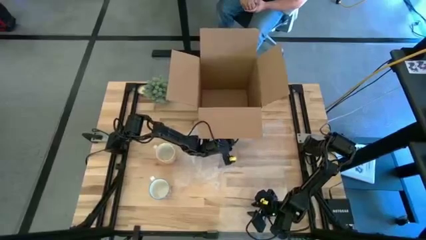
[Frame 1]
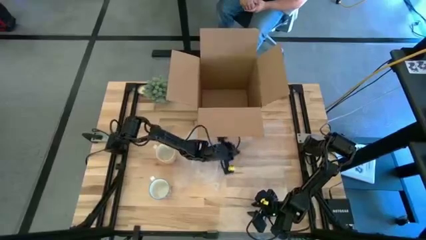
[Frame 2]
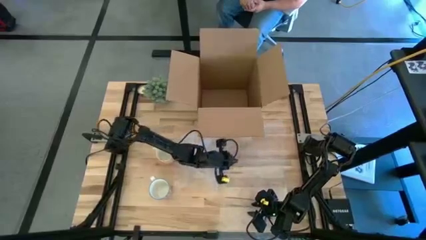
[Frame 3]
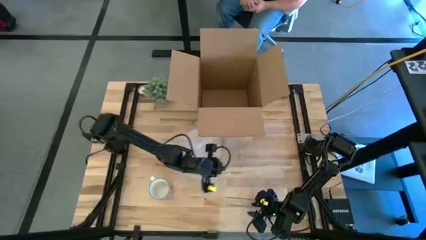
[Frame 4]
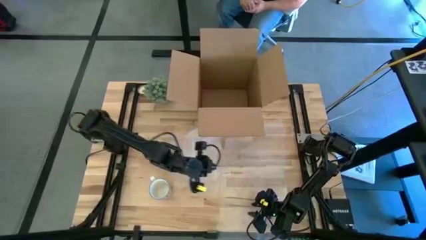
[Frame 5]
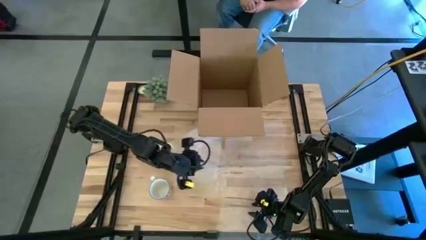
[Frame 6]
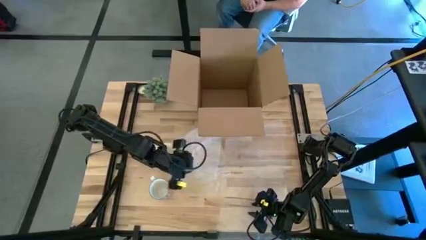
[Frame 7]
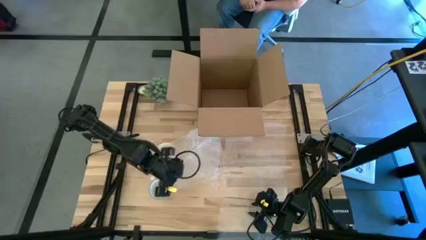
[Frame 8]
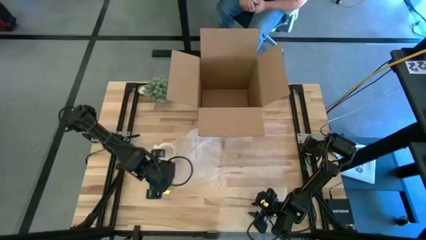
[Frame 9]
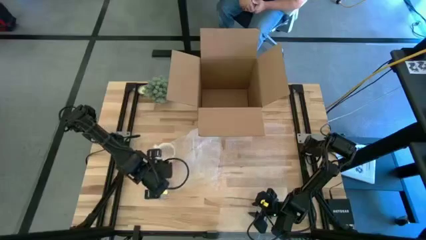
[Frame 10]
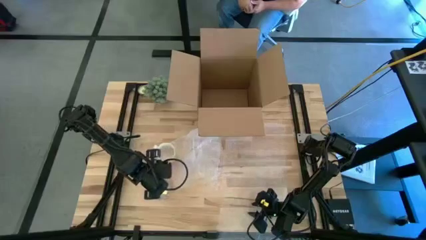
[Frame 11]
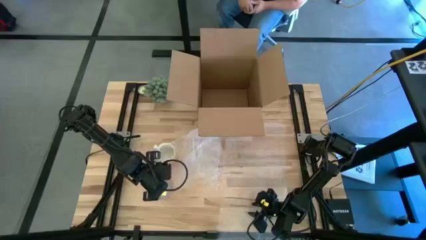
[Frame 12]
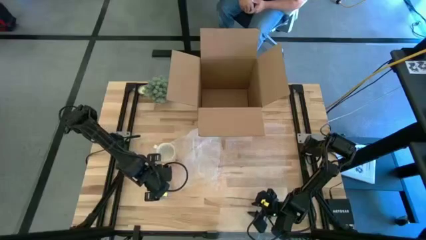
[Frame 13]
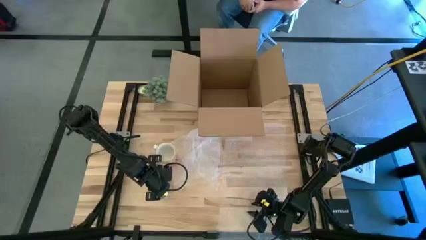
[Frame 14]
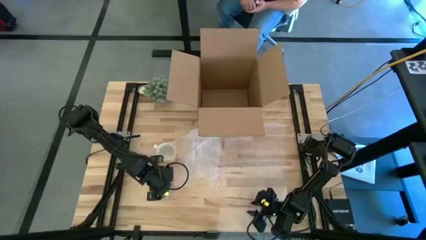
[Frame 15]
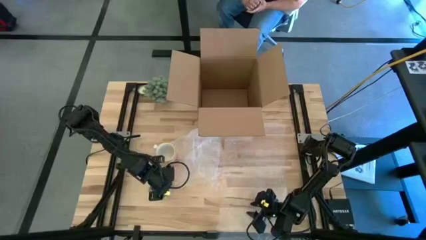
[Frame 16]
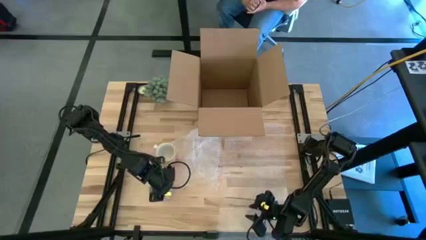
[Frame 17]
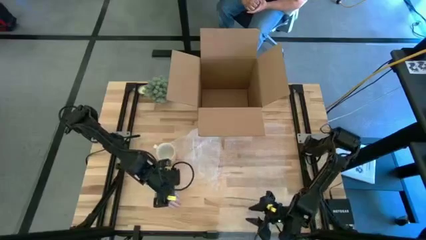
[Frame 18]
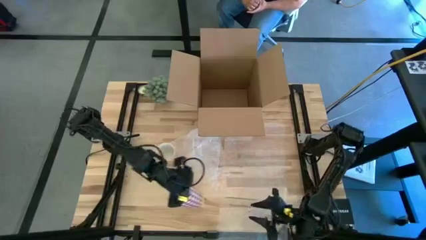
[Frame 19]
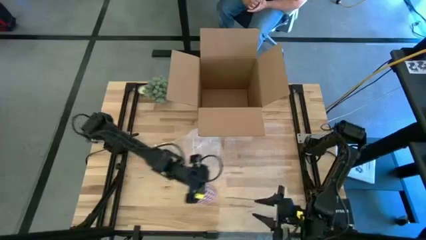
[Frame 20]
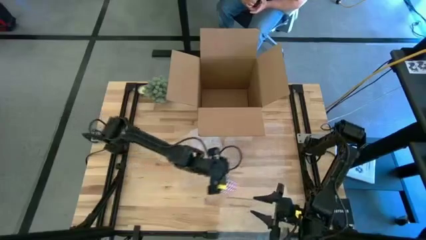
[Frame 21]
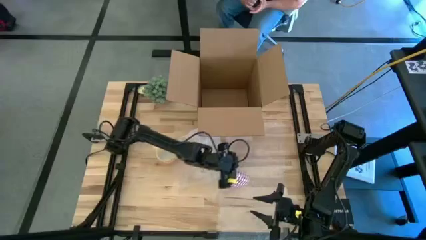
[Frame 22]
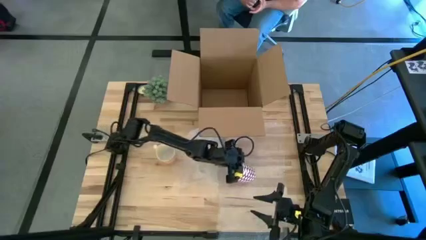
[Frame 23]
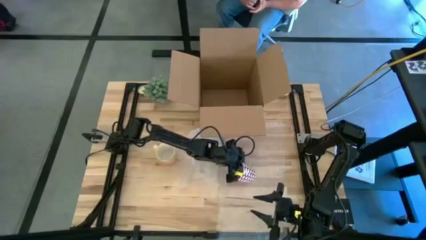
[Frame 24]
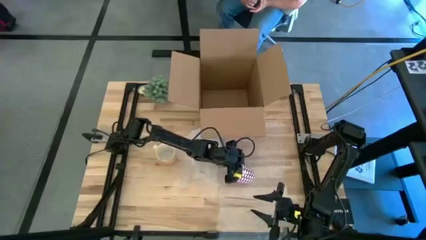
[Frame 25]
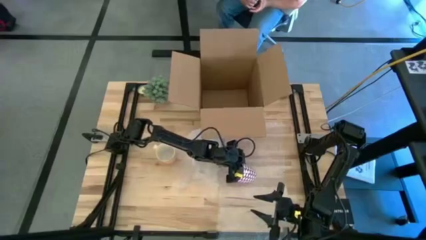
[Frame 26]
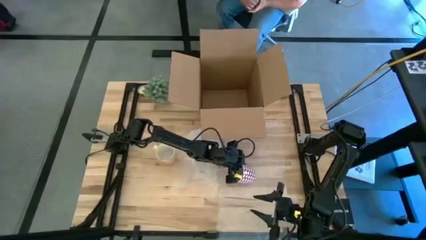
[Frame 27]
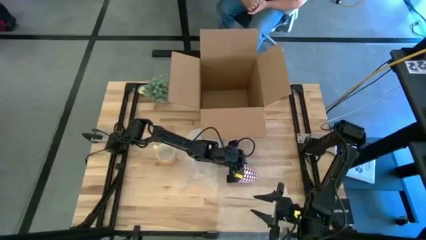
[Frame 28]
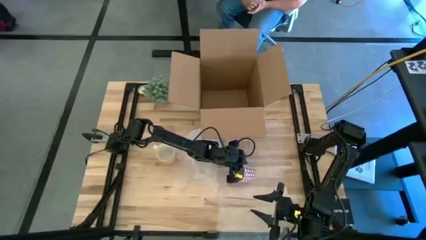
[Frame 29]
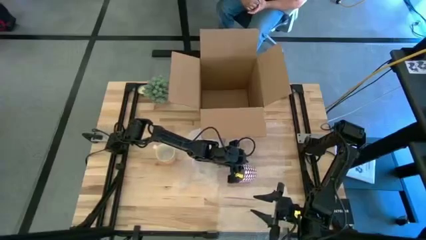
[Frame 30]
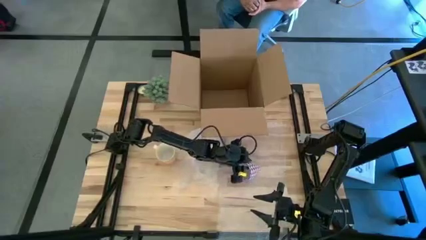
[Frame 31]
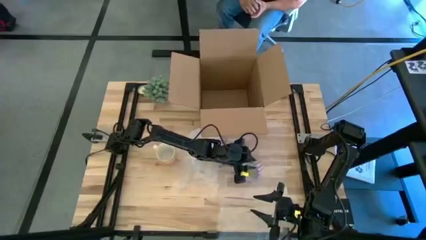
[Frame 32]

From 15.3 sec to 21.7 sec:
Task: wrap mug
Put the red mug on top of the right bubble wrap on the table

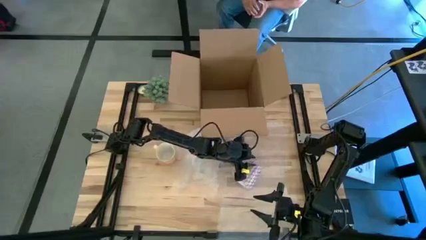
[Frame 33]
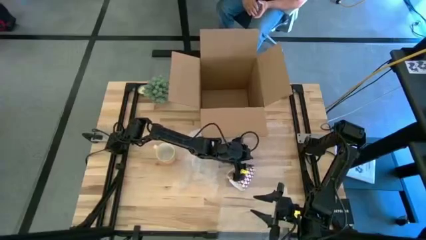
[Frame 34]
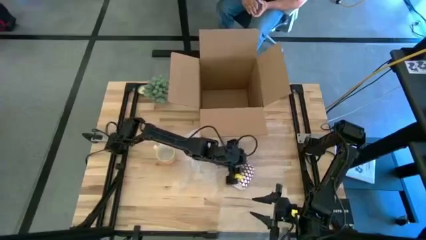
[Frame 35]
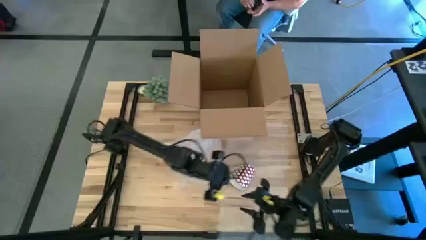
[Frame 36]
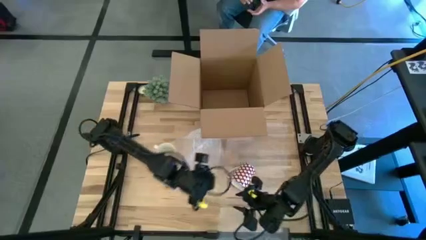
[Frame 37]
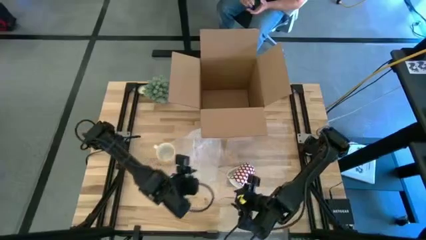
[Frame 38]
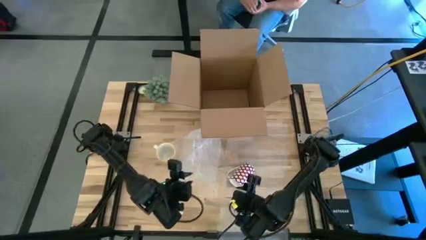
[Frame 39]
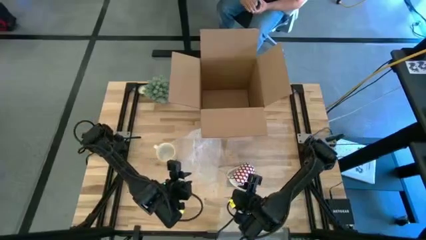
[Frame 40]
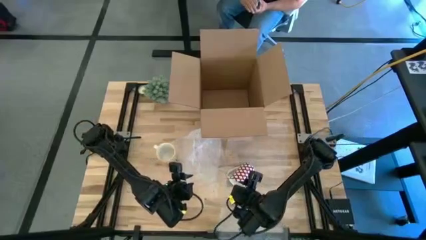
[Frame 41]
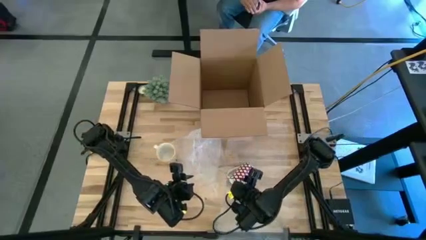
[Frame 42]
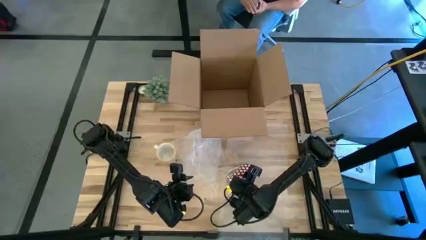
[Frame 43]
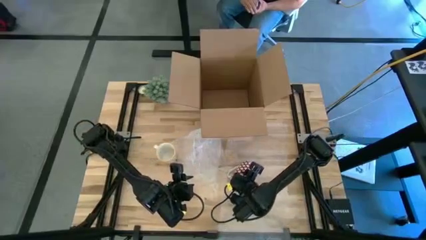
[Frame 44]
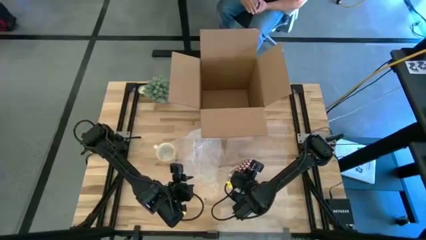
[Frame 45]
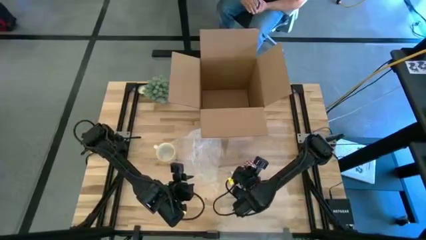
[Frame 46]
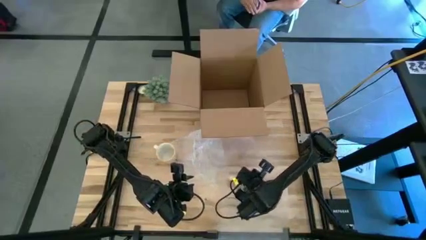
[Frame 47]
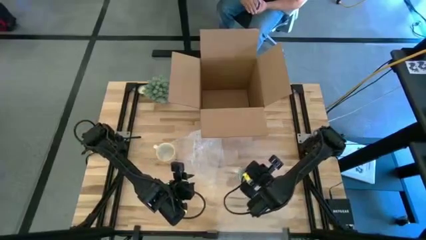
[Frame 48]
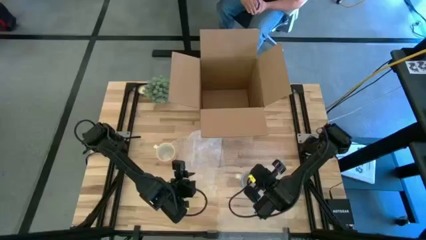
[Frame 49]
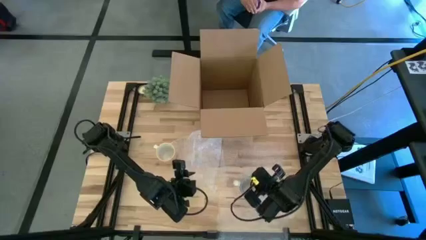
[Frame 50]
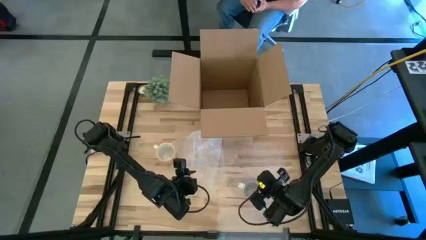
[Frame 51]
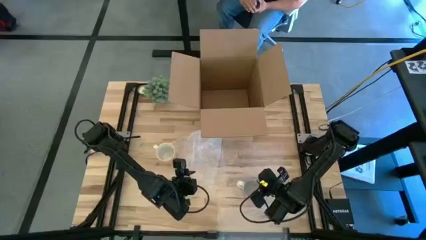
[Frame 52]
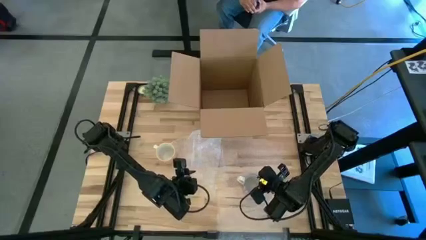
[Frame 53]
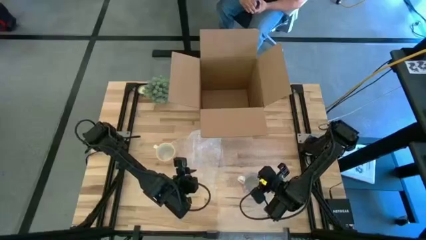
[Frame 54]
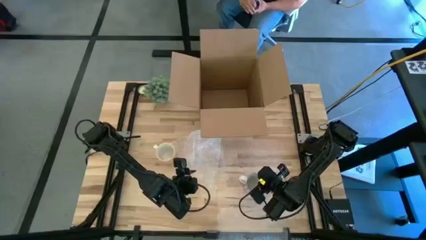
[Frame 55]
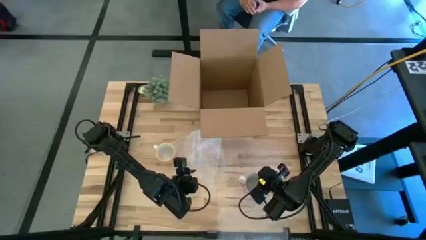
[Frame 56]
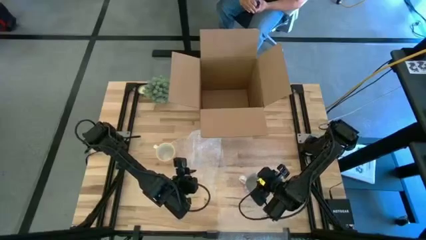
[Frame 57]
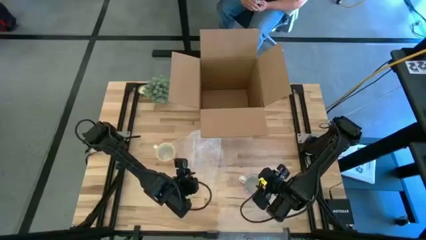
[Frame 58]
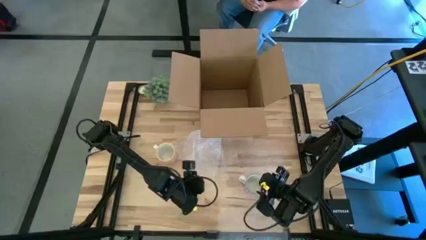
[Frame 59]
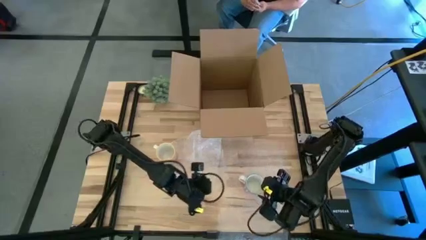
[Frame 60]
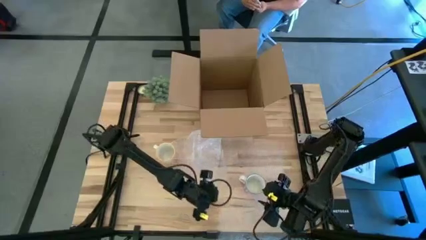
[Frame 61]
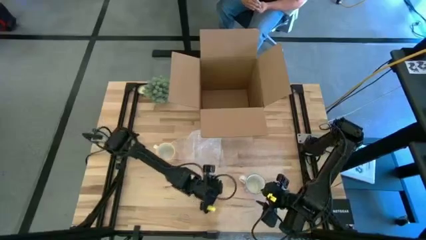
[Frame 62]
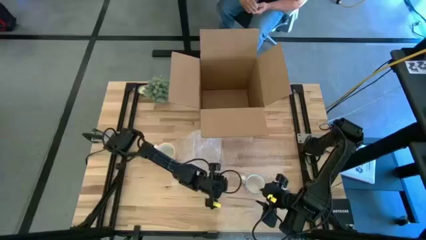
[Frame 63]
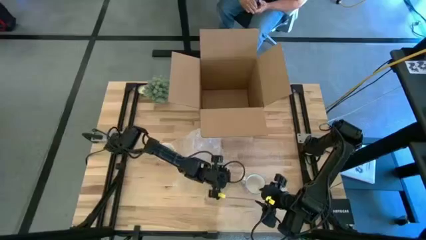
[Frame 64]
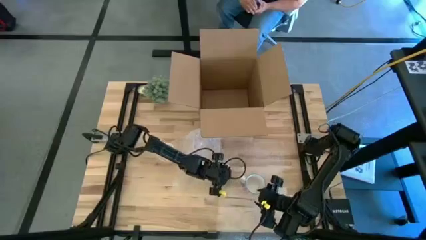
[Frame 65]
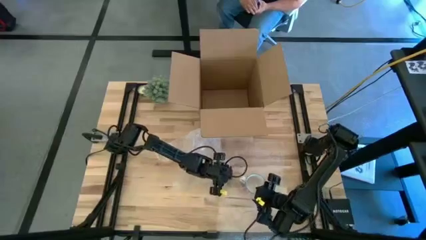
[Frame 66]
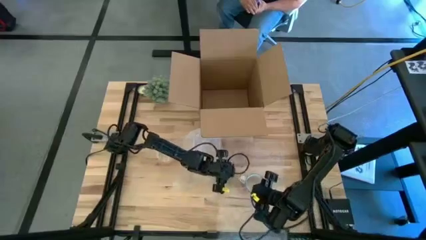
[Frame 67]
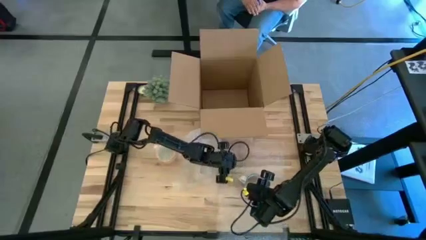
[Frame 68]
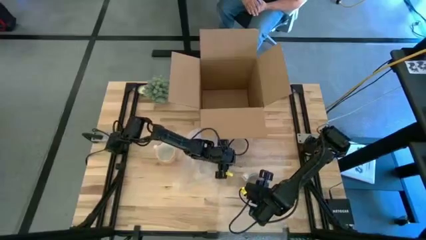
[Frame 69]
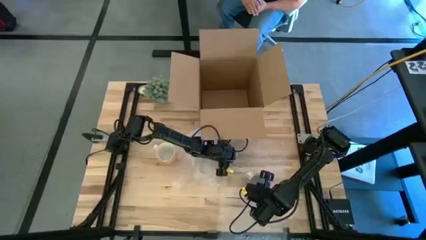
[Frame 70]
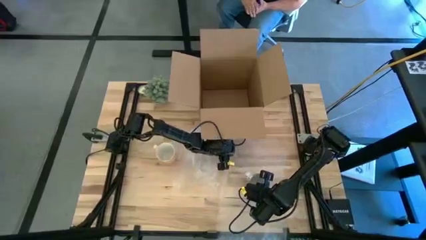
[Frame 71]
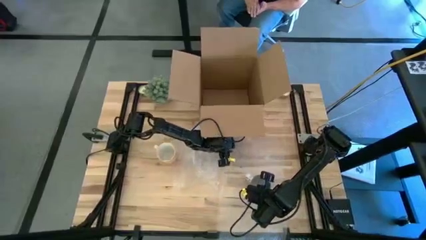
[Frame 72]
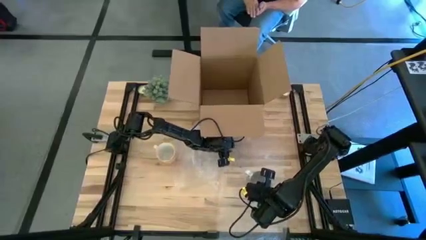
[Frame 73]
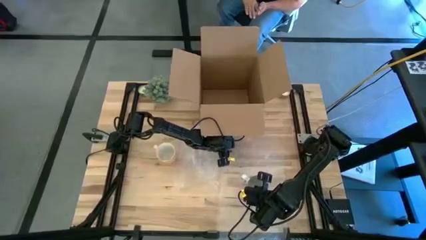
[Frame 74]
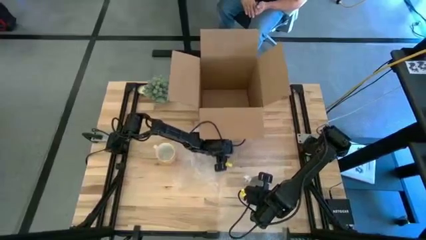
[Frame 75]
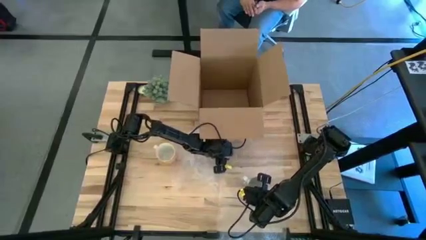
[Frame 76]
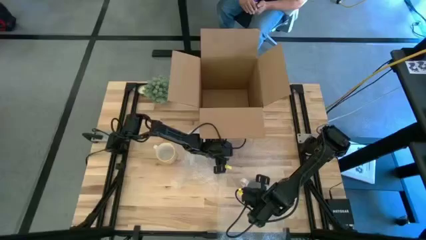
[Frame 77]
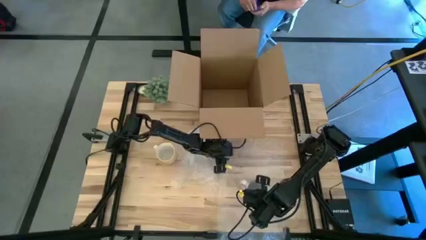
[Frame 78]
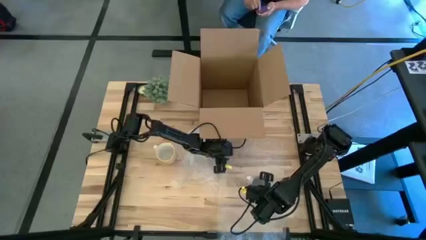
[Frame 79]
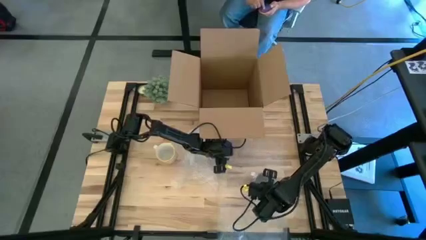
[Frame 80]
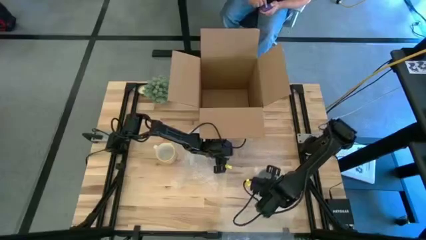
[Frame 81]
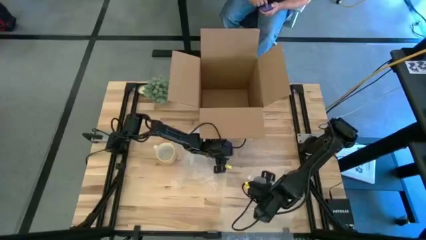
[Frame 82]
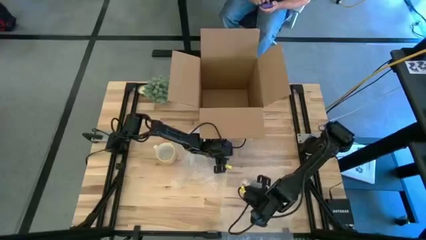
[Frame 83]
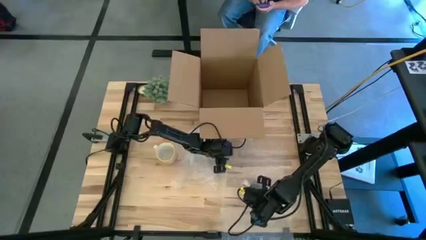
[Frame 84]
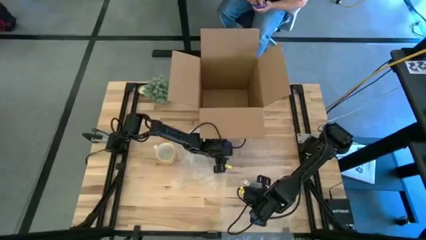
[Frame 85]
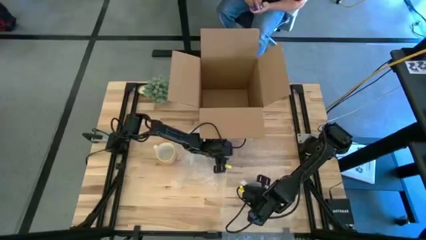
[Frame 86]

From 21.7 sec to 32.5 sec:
Put the red mug on top of the right bubble wrap on the table
